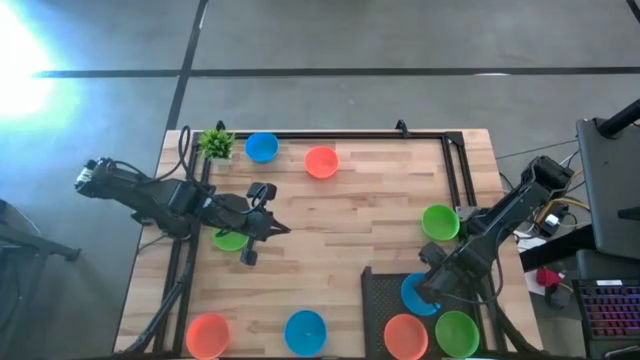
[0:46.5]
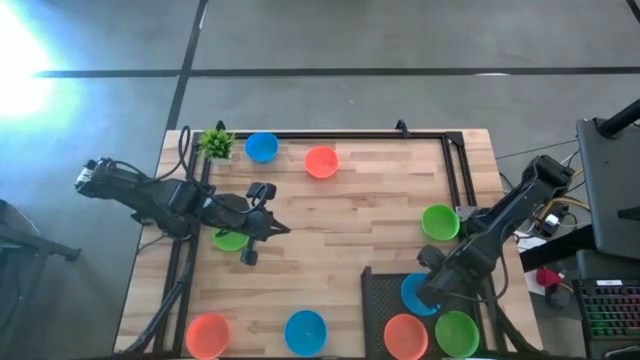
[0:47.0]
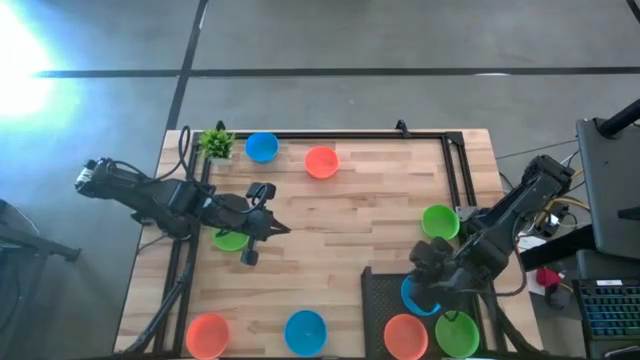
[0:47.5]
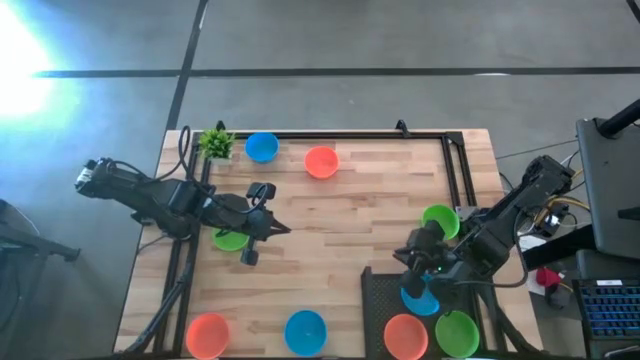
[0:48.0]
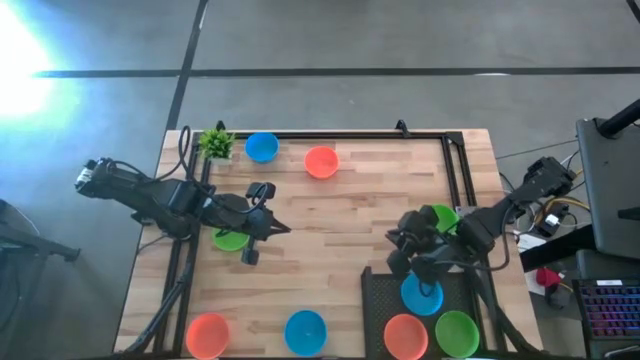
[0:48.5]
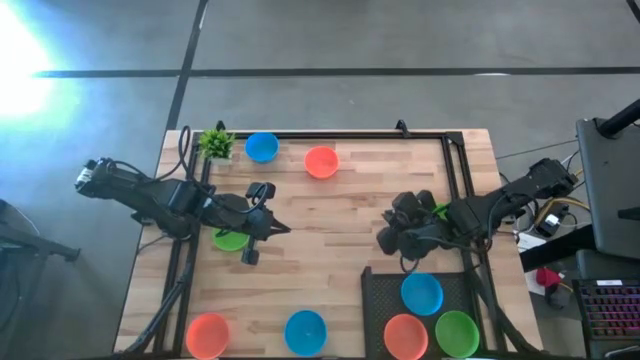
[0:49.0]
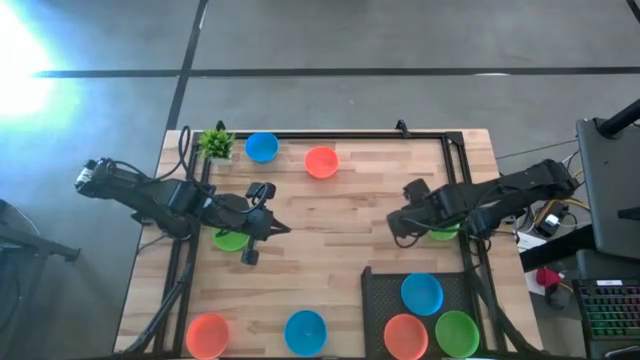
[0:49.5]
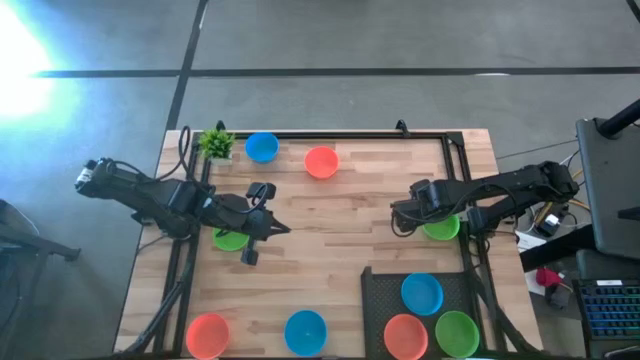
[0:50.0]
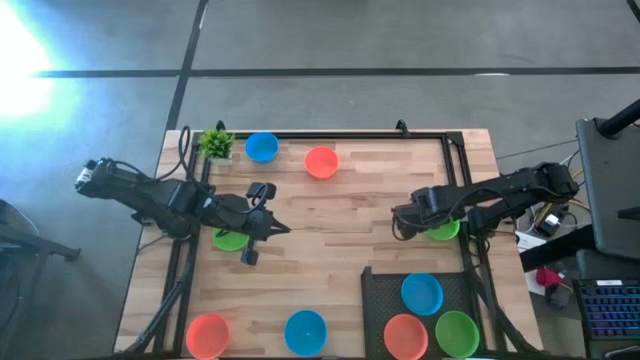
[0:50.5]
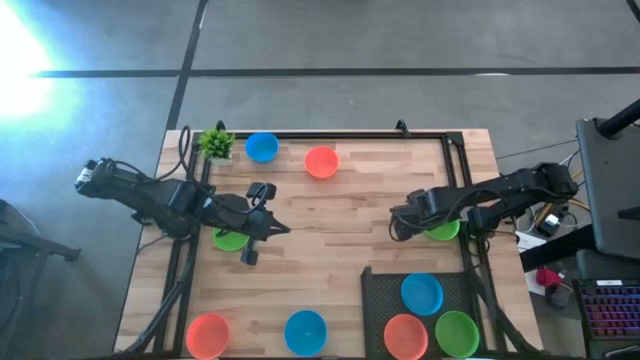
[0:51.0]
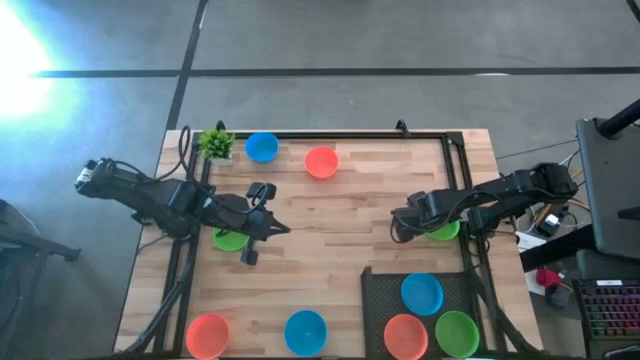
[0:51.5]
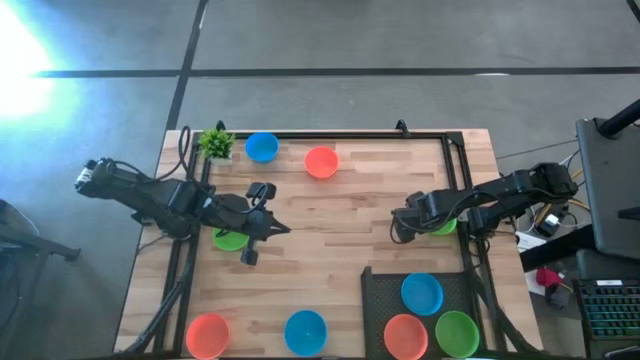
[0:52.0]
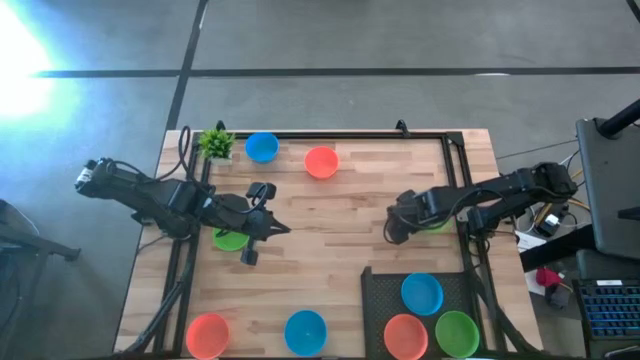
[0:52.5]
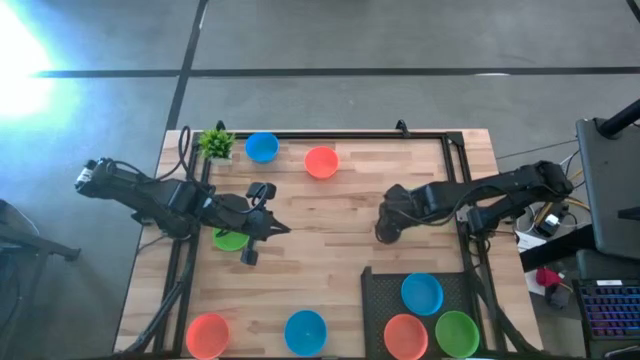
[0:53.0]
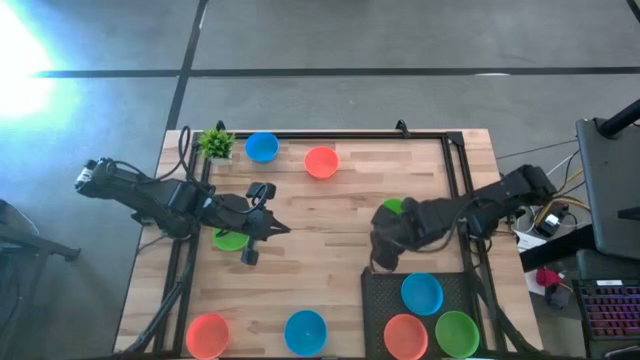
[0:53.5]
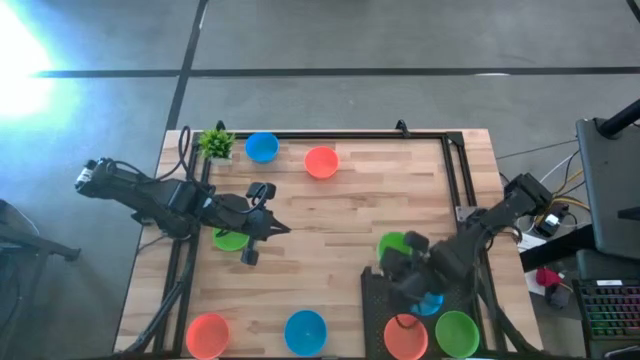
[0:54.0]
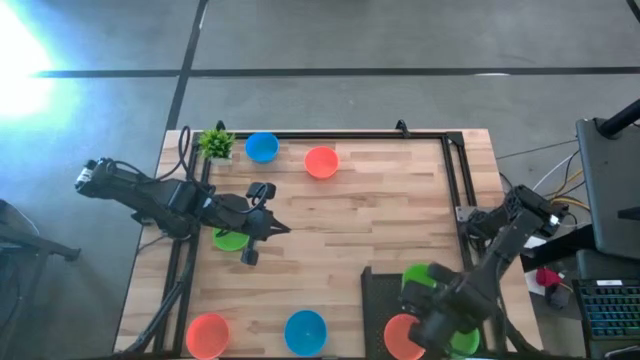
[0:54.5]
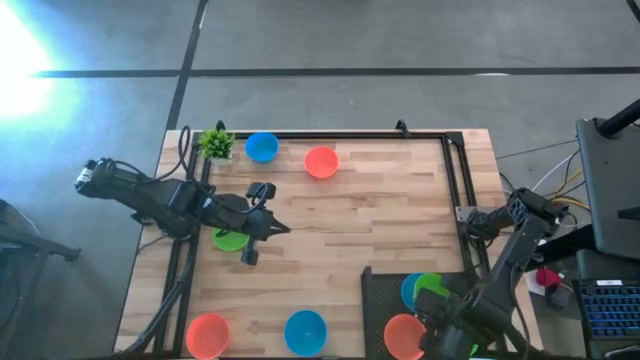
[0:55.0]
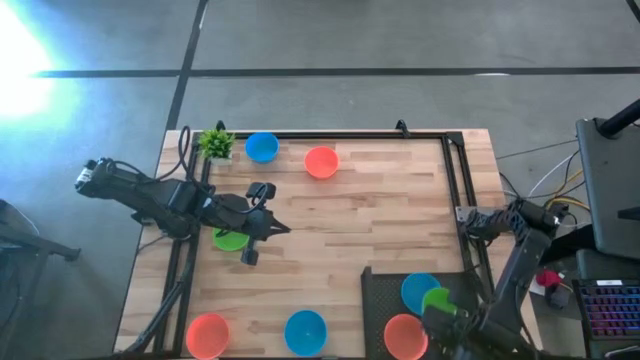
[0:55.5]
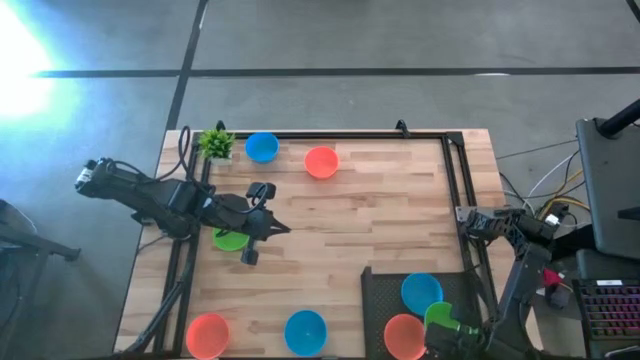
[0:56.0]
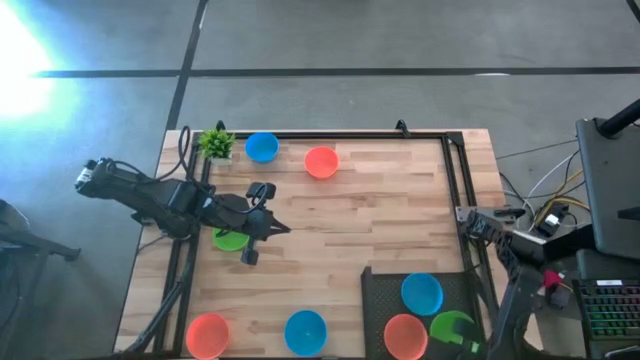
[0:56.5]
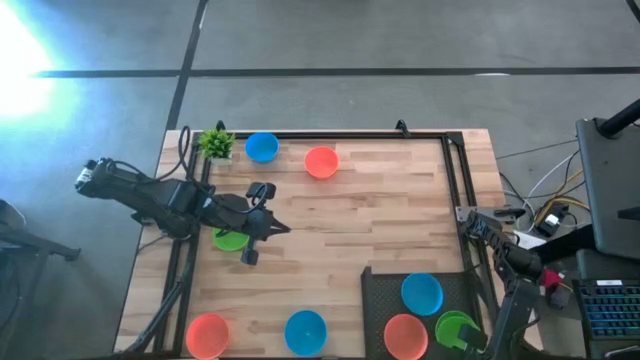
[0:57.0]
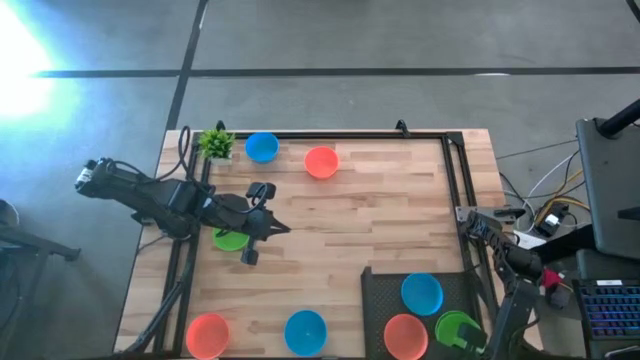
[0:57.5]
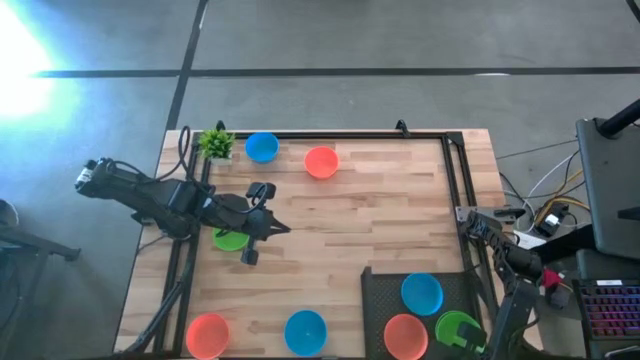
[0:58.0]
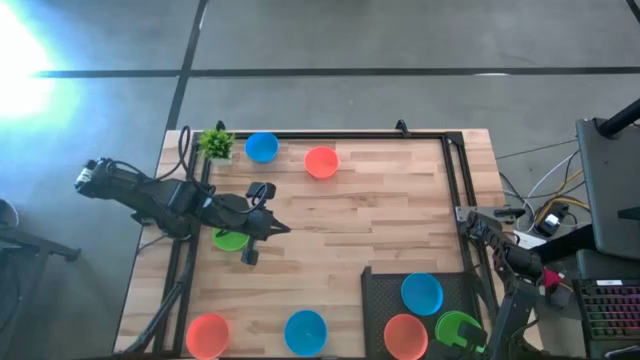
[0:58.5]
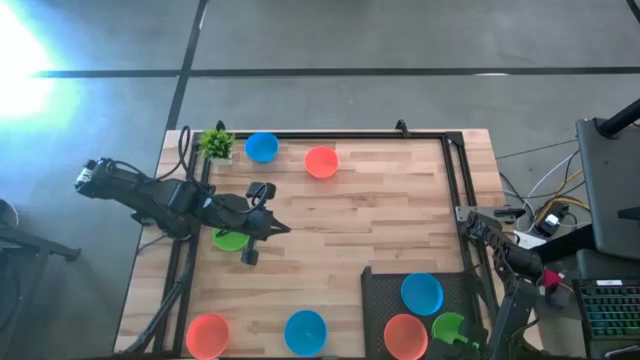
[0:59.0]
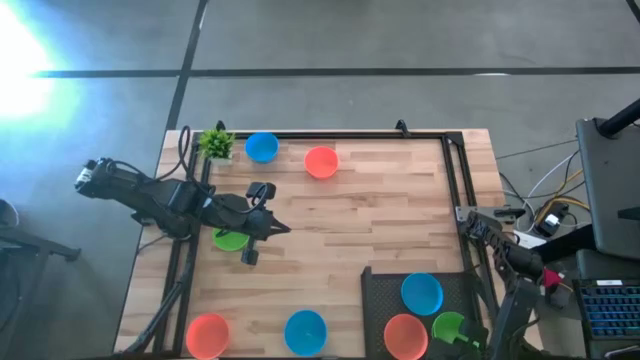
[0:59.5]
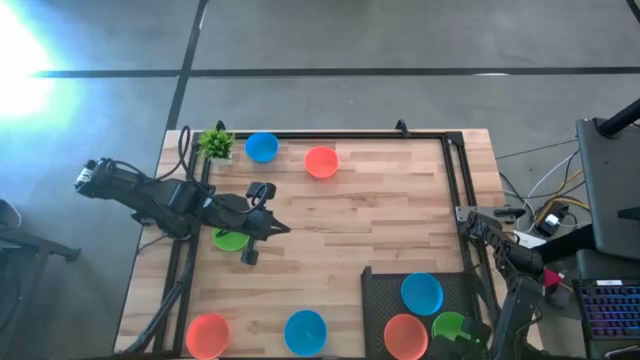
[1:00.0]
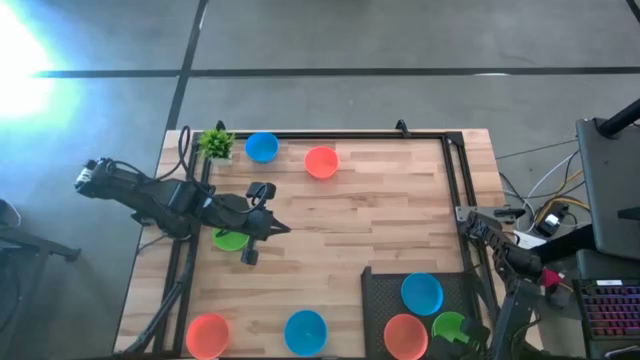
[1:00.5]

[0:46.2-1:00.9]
Task: Pick & Place Mini bowls
Stack the right green bowl on the green bowl on the shelf

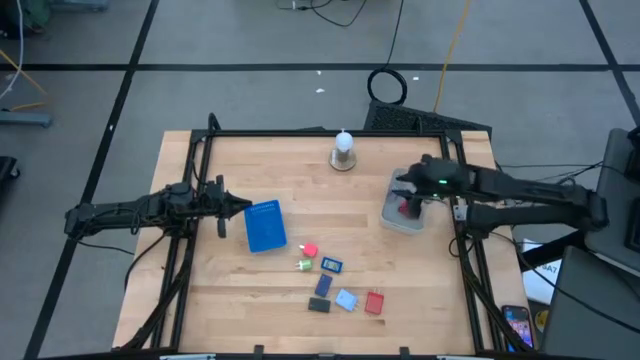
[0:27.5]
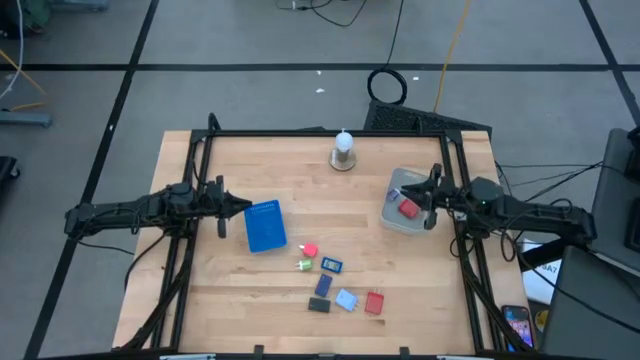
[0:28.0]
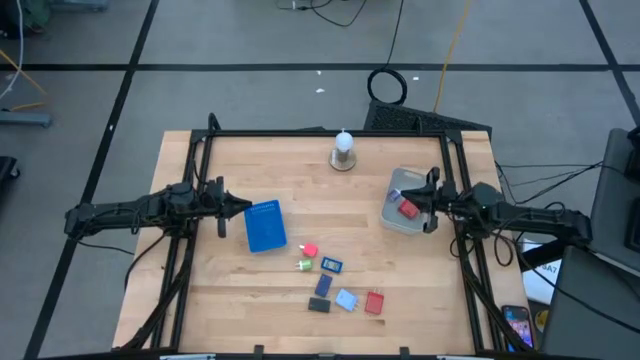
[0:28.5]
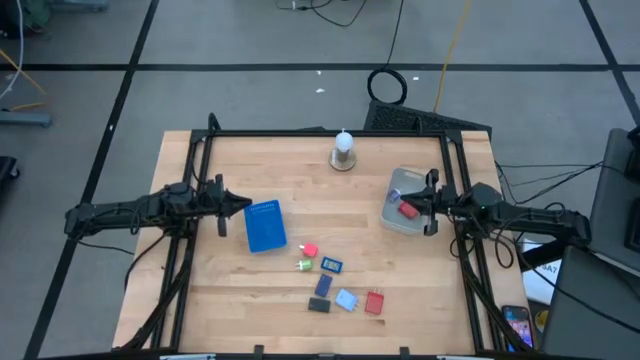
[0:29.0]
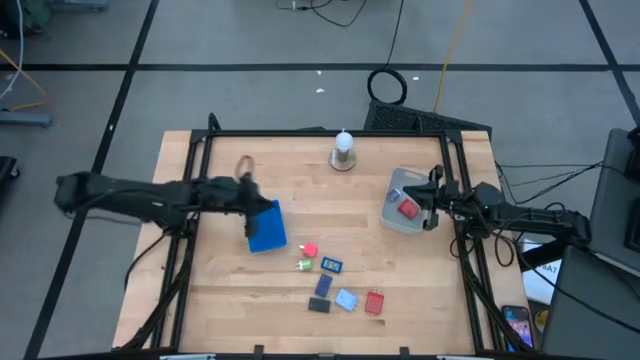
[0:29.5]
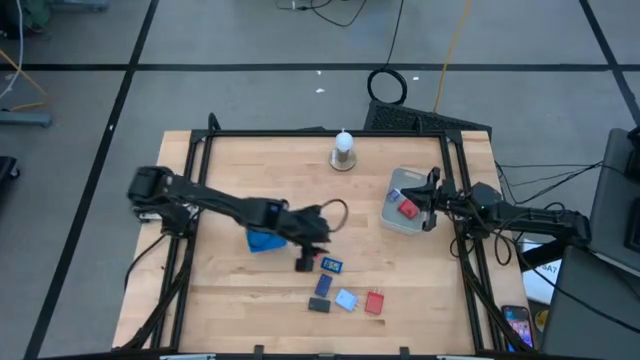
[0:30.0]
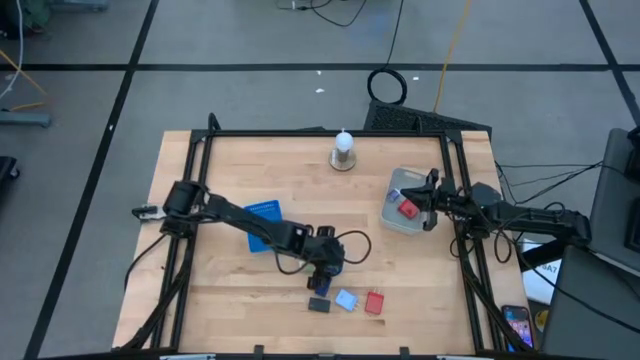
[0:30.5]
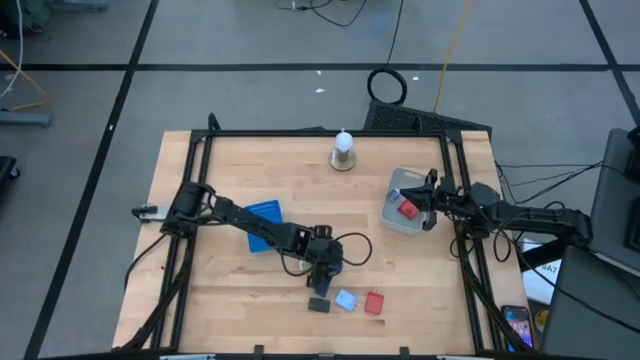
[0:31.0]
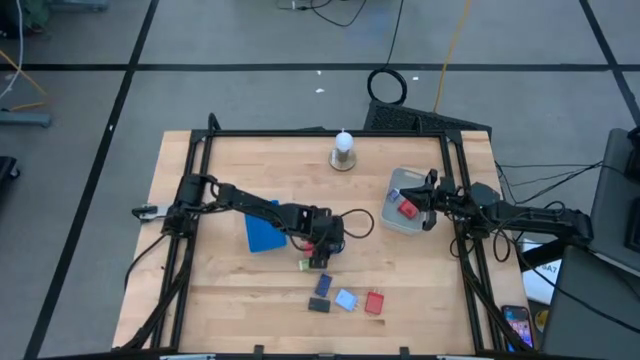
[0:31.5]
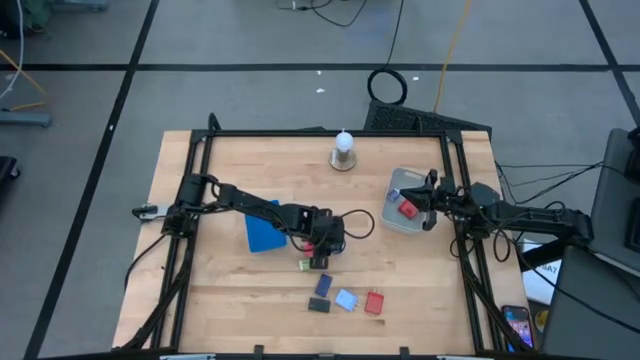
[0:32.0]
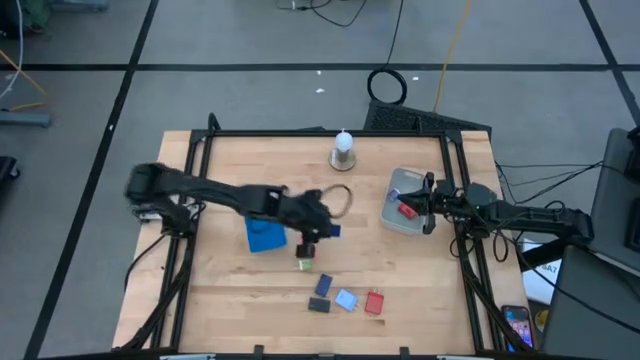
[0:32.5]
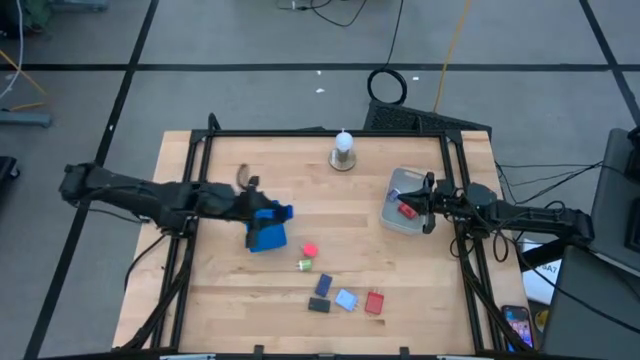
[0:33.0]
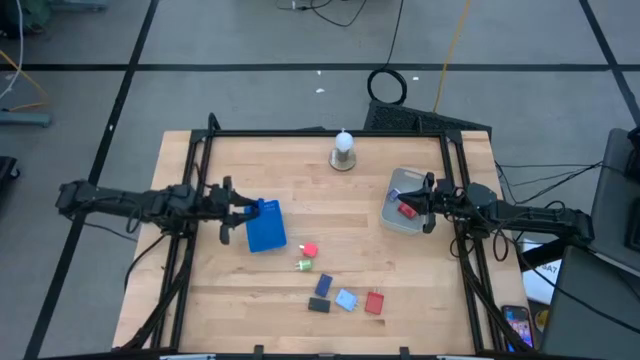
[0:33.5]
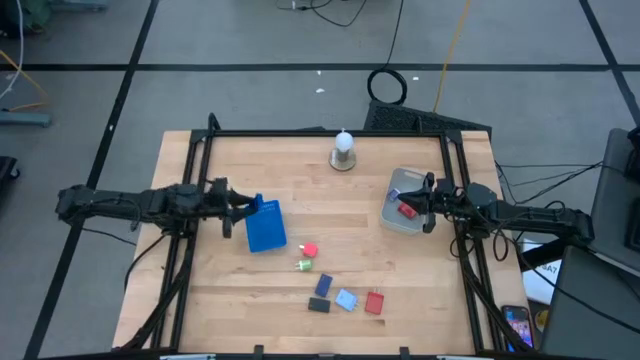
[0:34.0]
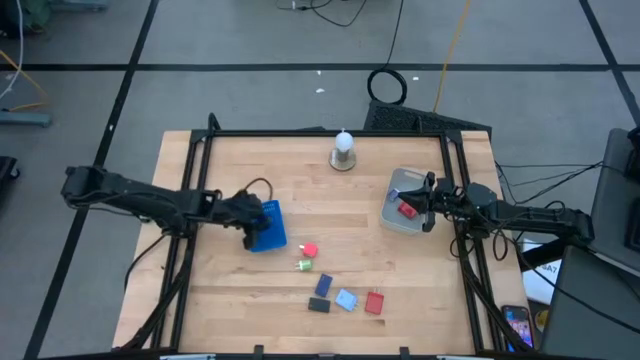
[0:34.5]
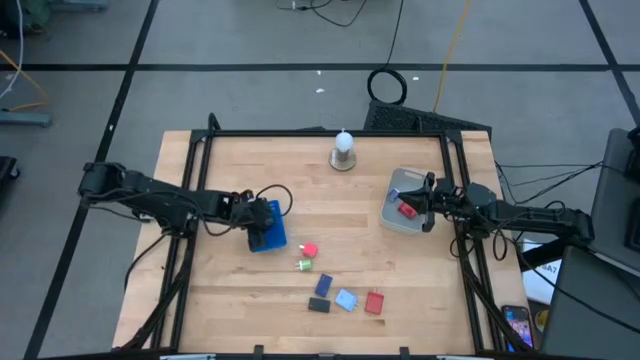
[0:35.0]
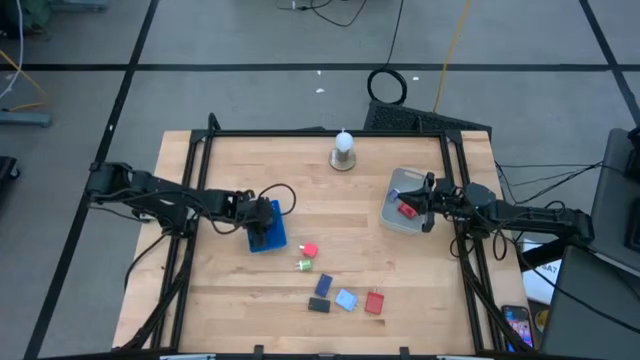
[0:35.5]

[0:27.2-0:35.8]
Task: Pick & Place Office items
Put the blue digital clock into the blue basket
